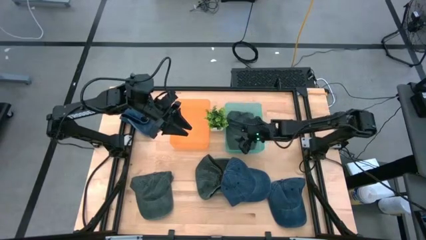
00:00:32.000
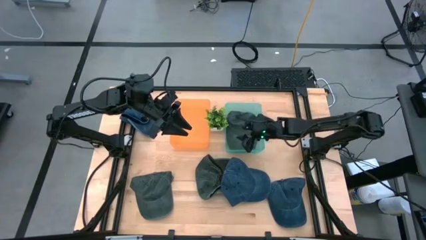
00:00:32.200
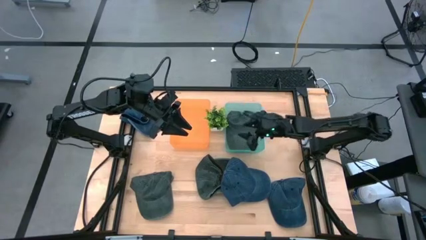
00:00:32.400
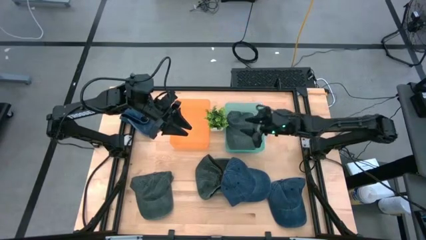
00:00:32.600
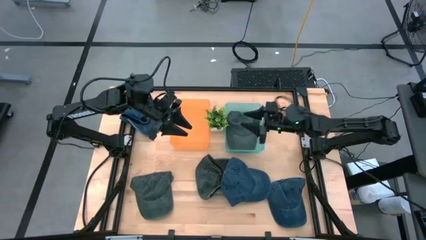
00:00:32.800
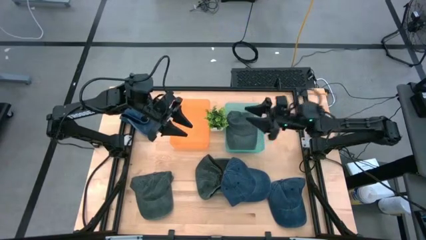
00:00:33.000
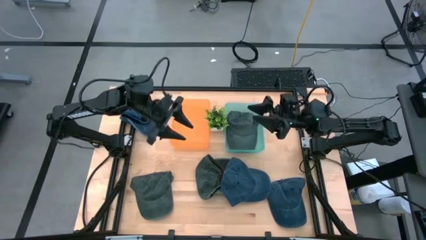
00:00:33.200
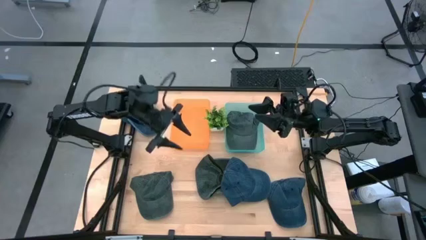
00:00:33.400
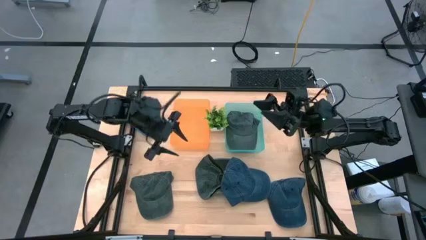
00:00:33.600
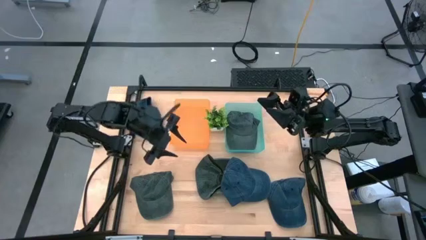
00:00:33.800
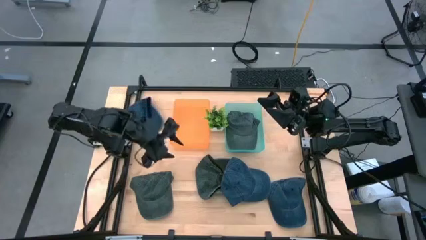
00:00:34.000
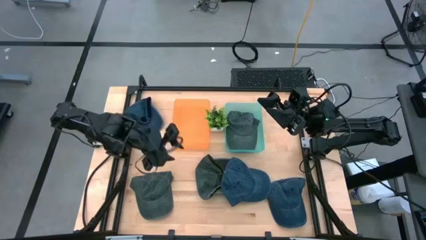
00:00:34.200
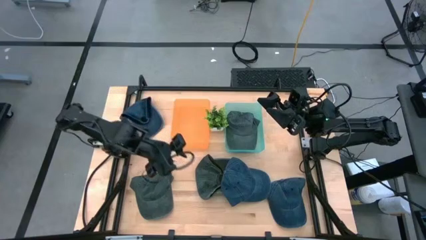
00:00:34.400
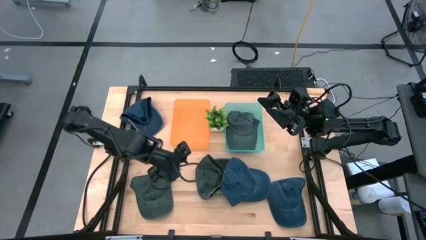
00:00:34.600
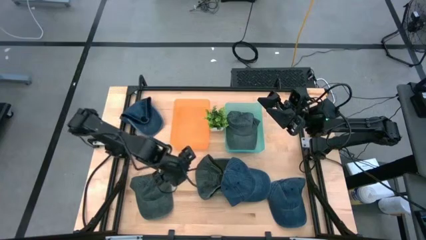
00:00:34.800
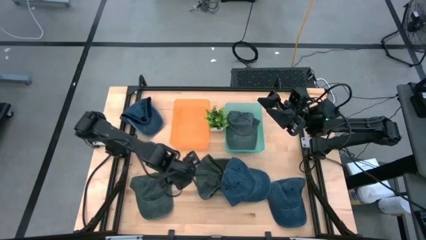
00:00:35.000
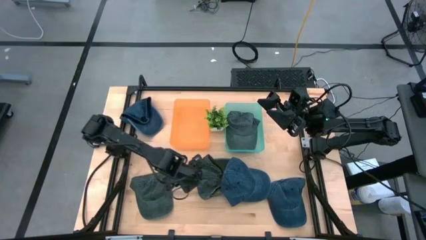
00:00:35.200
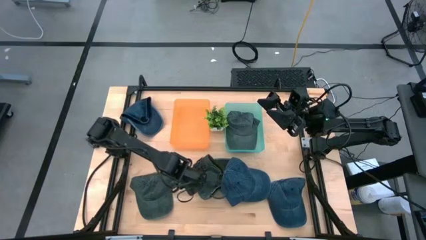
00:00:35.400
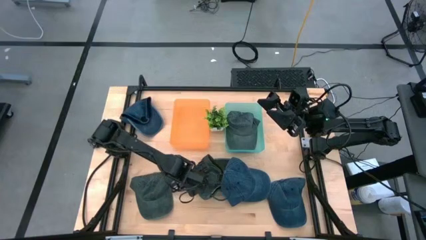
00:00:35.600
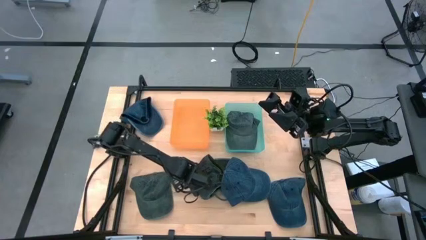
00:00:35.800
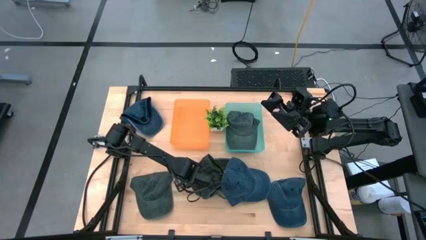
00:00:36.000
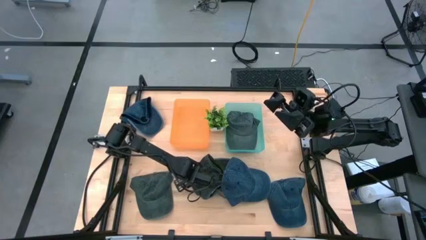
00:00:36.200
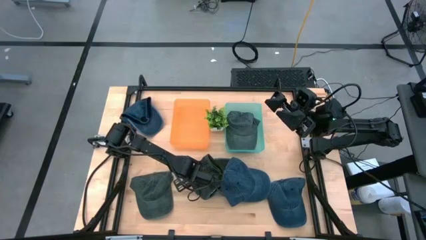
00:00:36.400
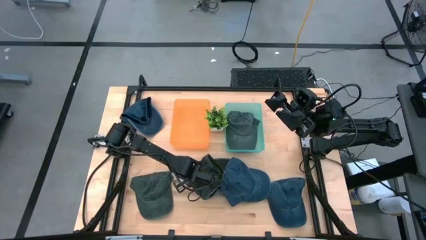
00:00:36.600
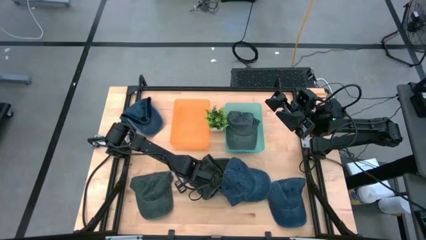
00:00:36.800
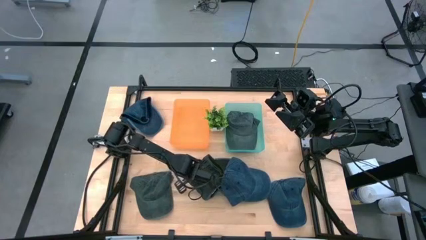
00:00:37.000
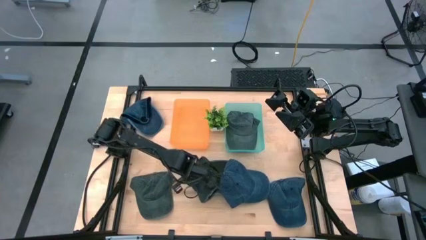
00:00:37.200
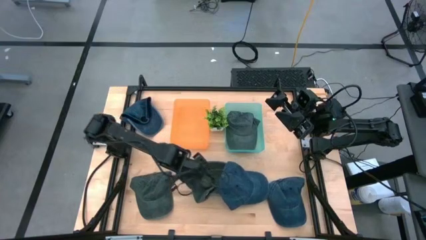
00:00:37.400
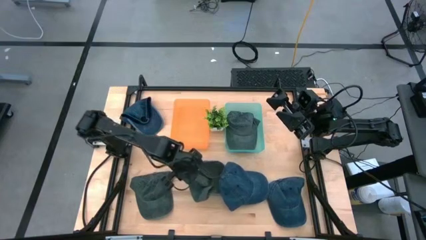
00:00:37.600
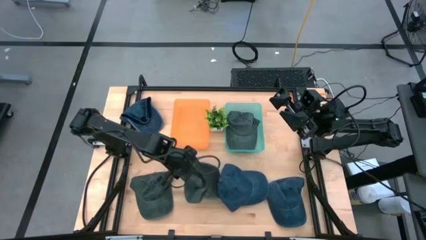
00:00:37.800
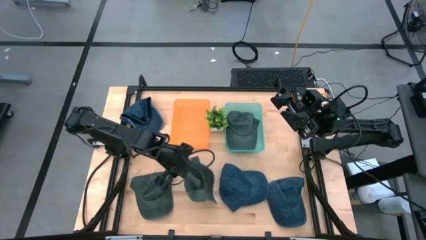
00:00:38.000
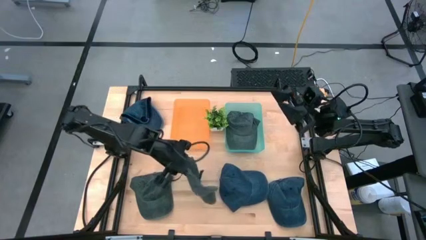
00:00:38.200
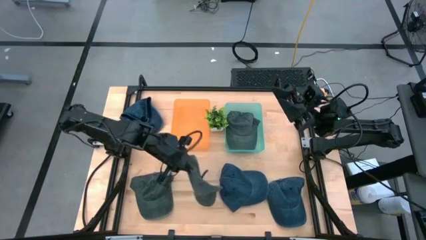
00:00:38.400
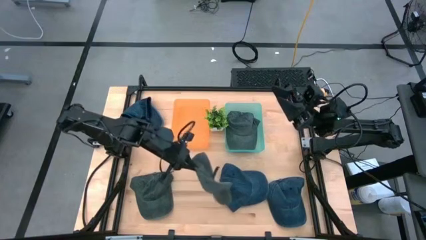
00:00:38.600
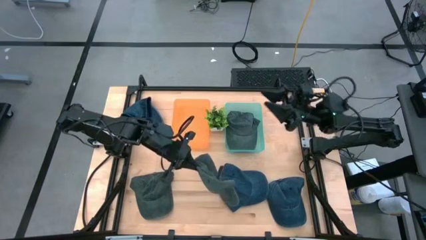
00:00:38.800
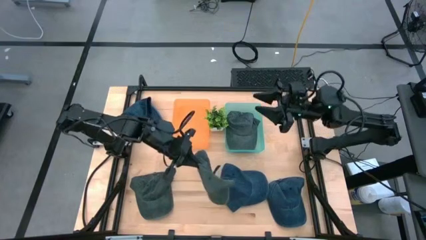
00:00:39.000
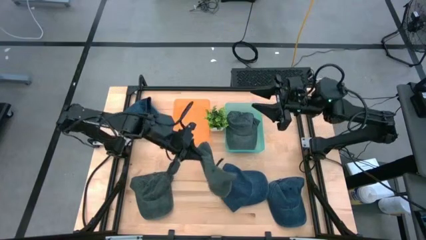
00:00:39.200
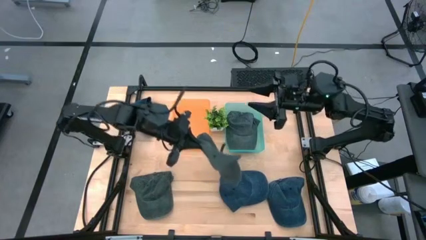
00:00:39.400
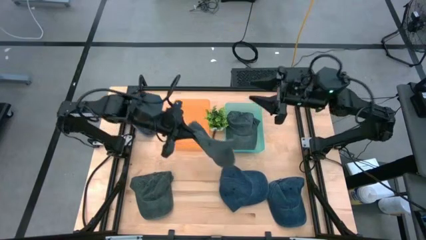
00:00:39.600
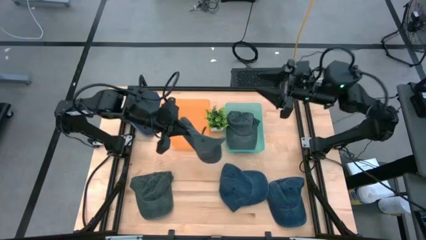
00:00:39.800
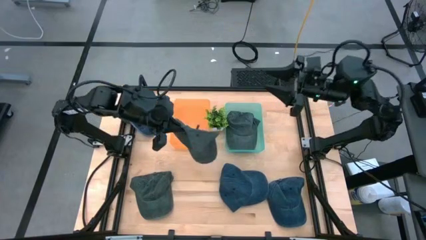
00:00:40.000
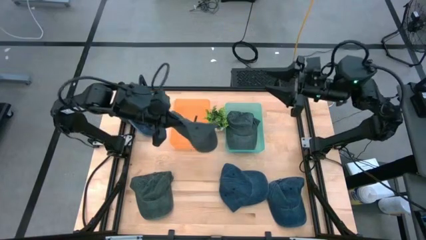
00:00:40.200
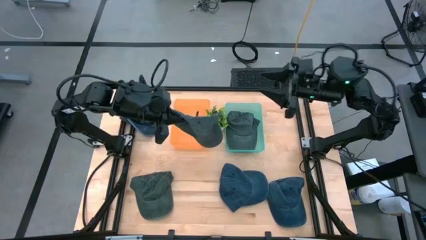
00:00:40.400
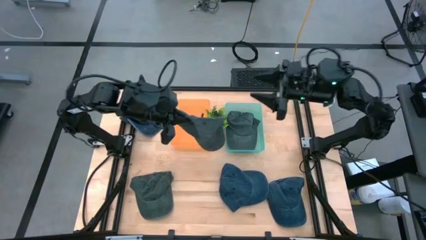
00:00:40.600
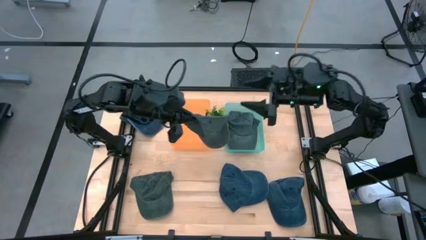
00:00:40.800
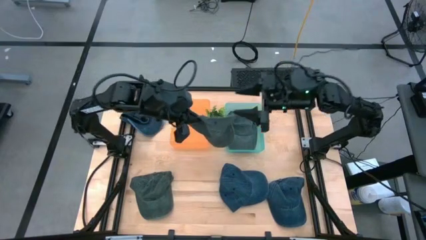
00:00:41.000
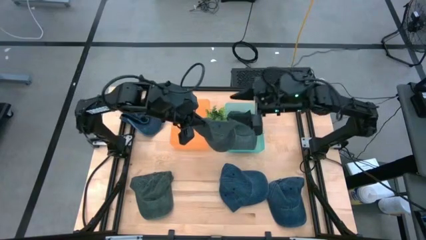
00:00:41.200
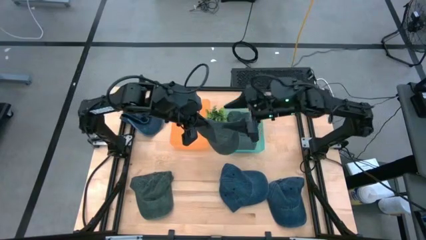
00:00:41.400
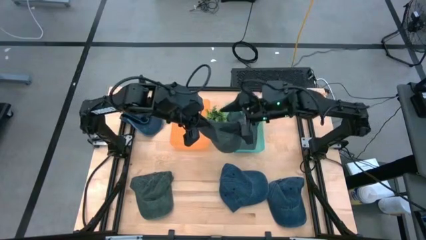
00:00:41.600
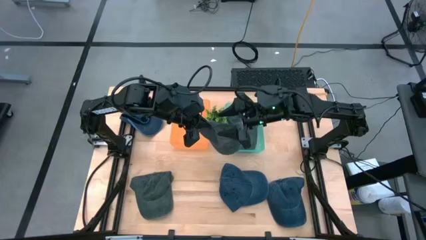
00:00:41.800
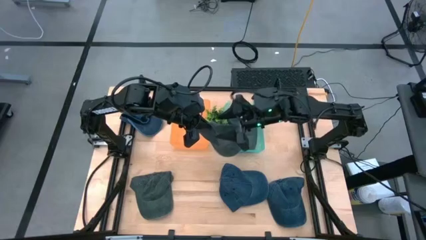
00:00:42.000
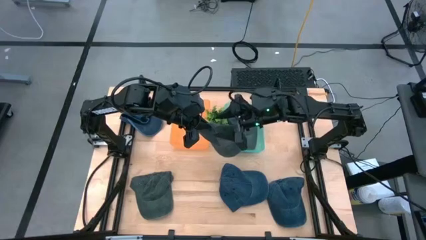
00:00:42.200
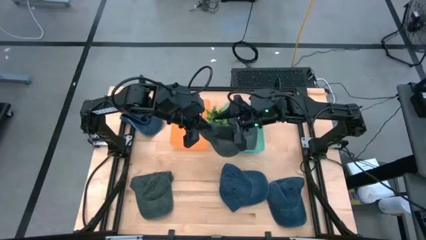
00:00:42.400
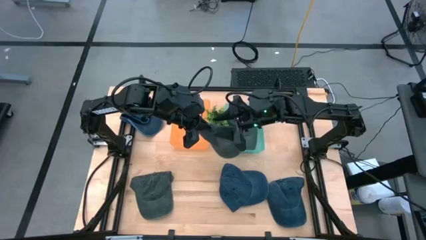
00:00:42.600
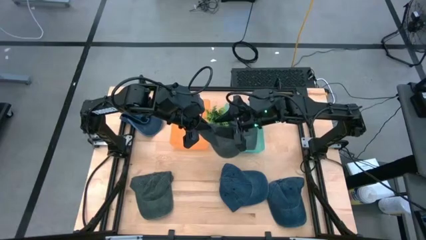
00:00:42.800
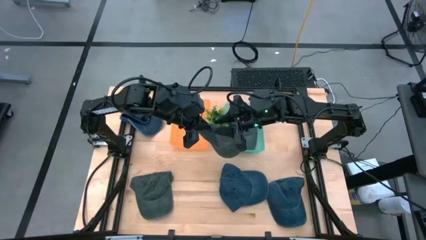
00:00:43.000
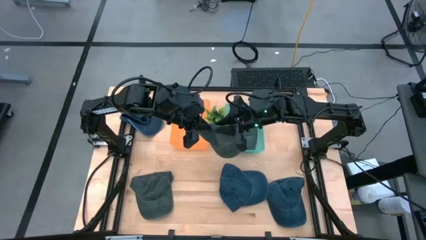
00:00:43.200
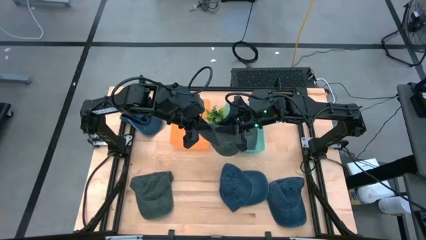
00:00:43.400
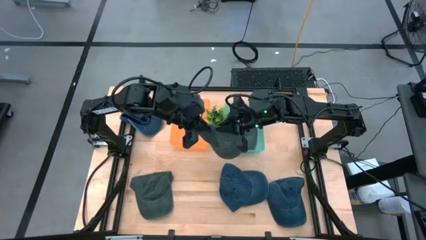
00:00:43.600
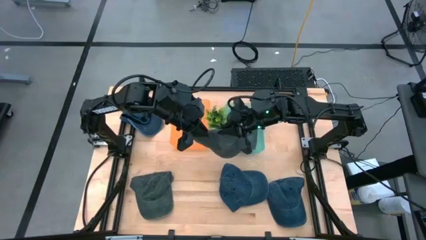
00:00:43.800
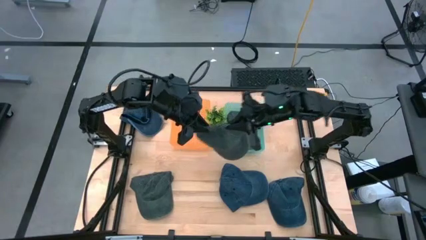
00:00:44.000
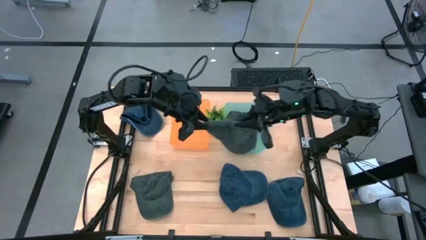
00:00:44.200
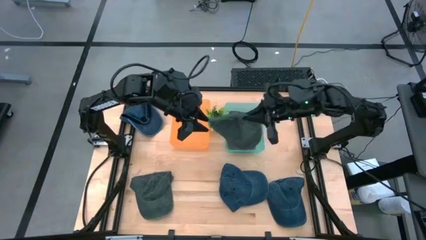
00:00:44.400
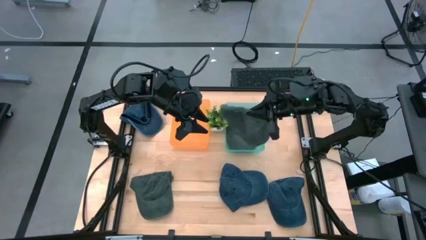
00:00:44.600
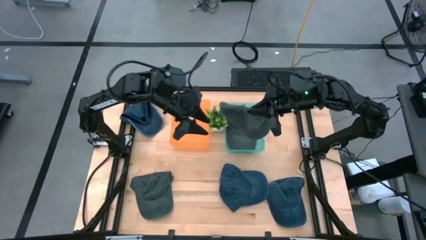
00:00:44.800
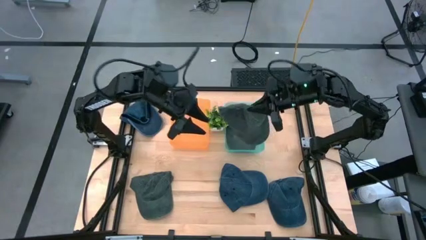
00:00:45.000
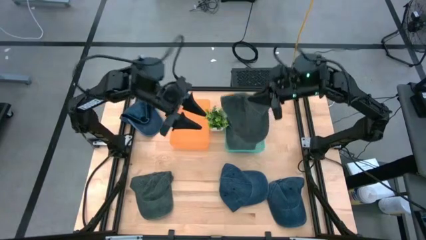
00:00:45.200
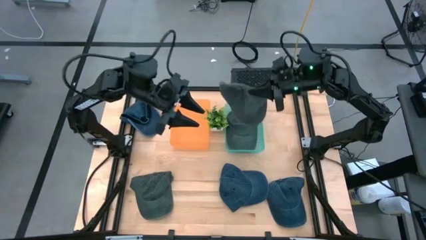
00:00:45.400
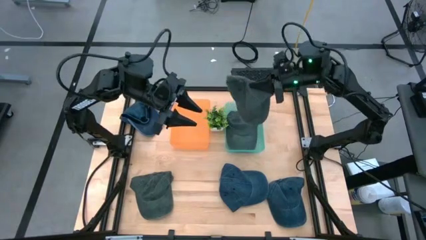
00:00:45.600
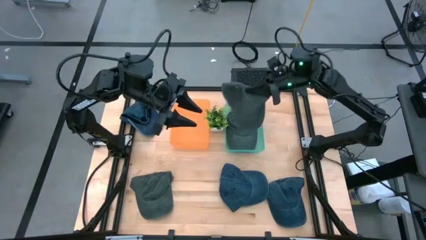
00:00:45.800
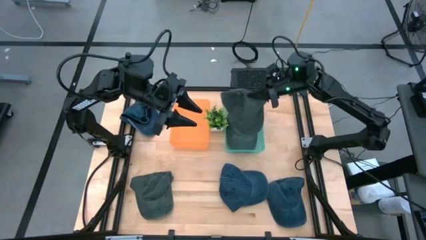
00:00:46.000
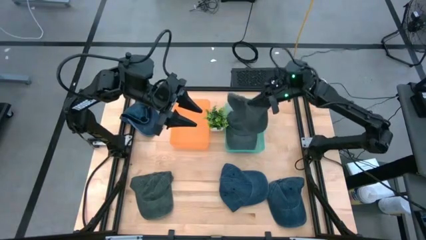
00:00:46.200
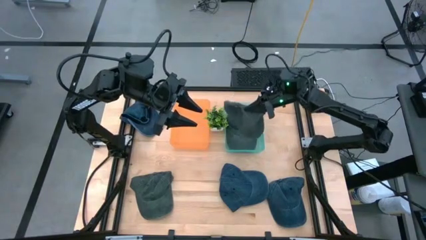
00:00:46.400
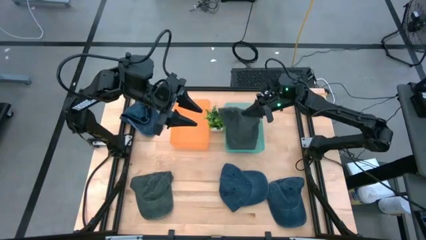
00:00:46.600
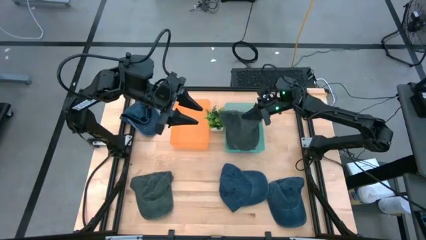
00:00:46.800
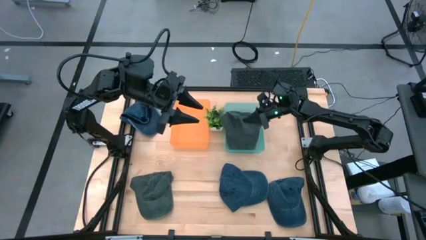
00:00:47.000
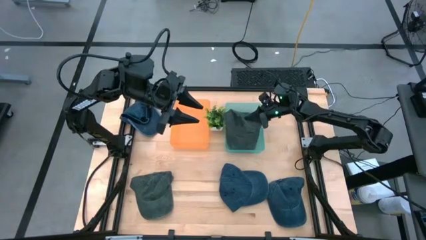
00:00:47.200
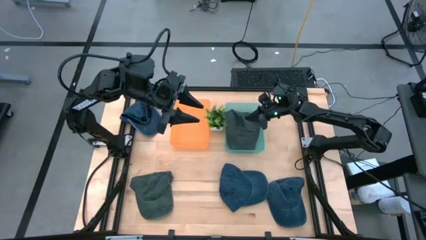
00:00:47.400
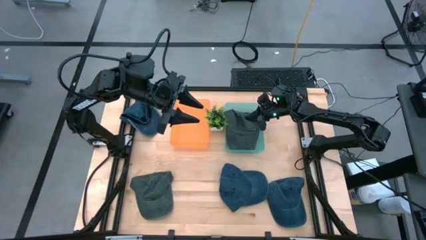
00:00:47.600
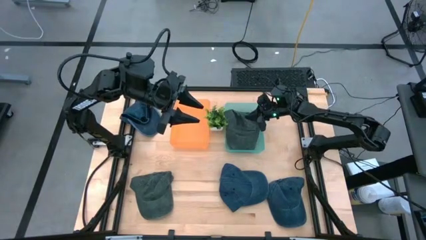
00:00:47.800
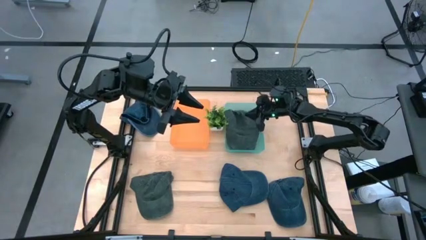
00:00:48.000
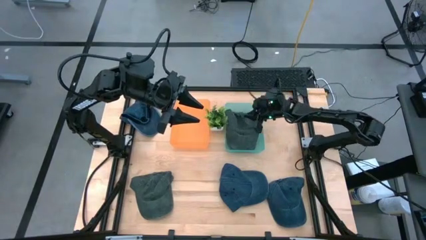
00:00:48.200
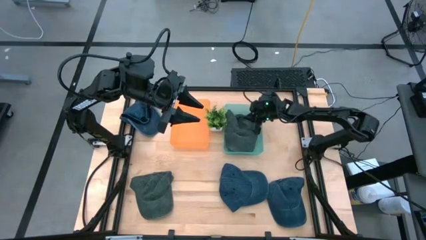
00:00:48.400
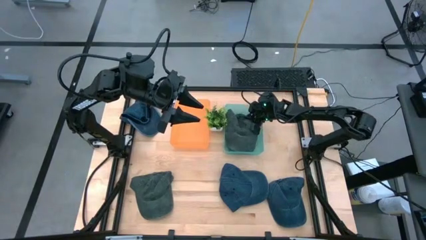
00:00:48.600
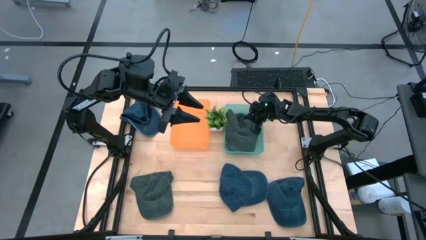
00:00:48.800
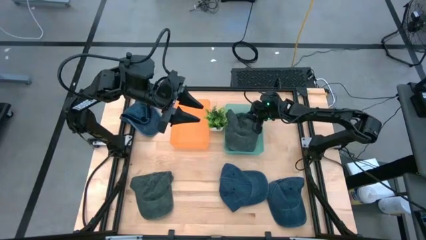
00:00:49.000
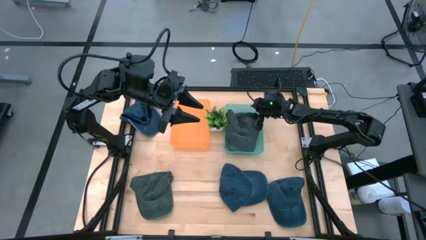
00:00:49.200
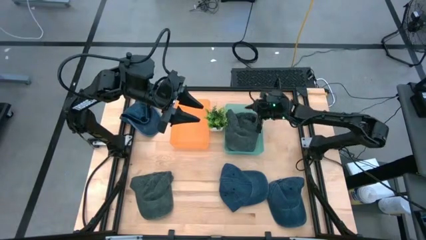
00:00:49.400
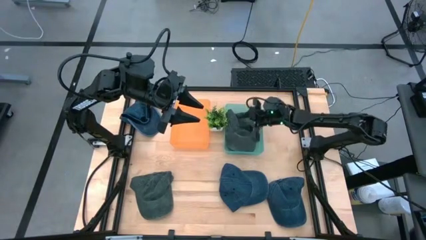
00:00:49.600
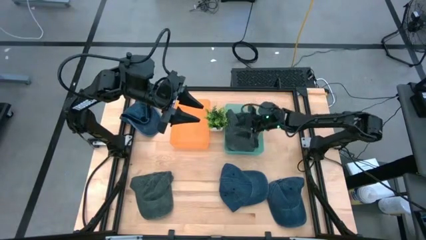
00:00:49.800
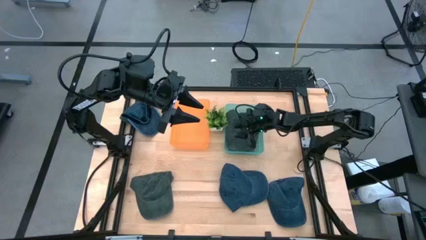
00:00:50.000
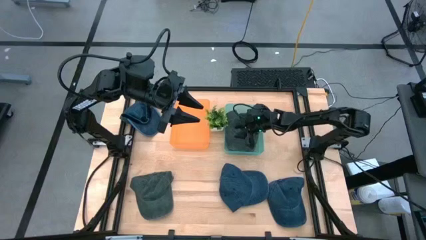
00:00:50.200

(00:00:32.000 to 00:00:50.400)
Task: Pick & Place hat
Put the right gray cap into the green bin
